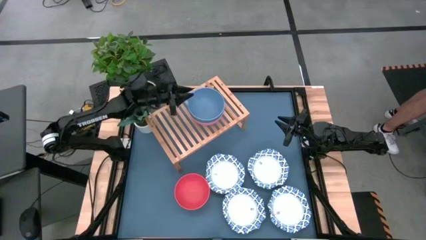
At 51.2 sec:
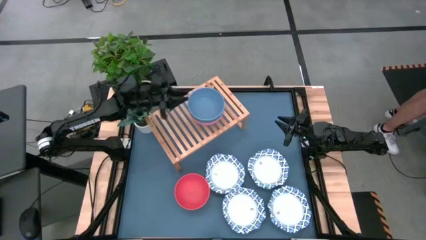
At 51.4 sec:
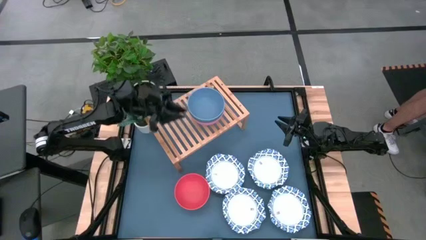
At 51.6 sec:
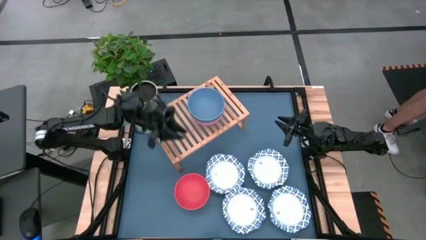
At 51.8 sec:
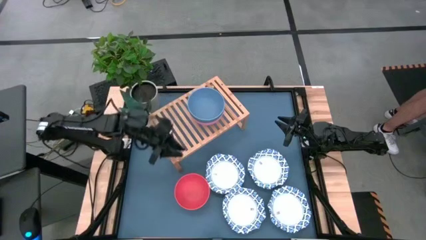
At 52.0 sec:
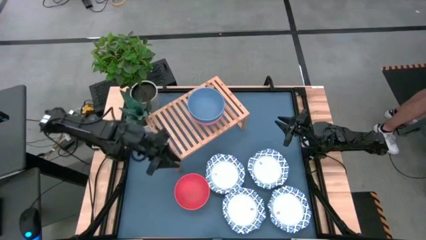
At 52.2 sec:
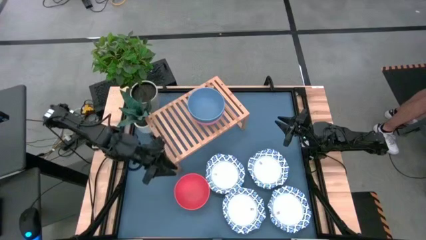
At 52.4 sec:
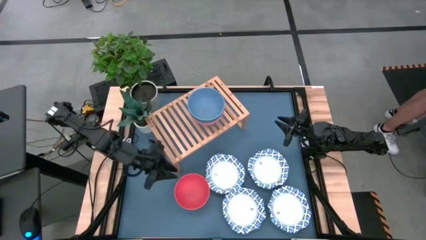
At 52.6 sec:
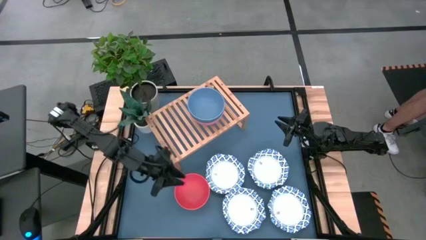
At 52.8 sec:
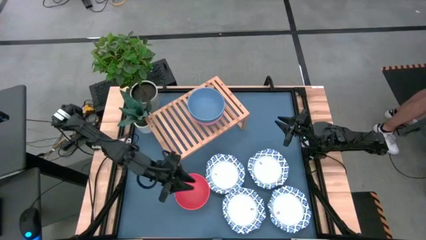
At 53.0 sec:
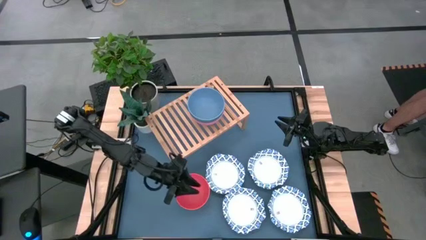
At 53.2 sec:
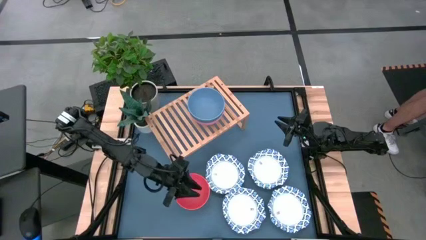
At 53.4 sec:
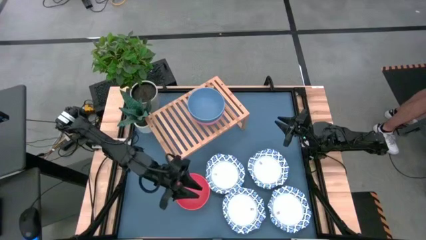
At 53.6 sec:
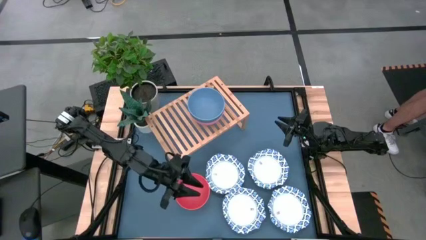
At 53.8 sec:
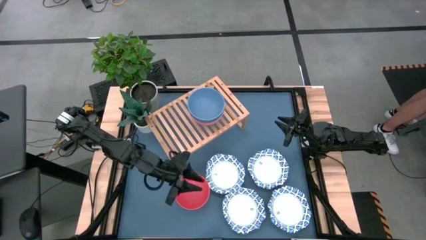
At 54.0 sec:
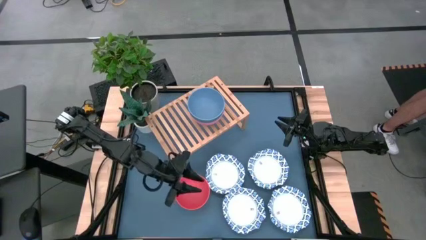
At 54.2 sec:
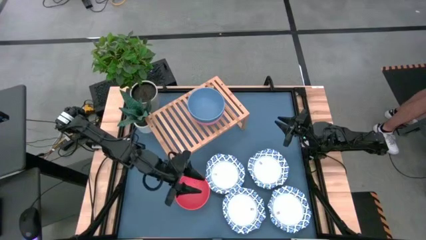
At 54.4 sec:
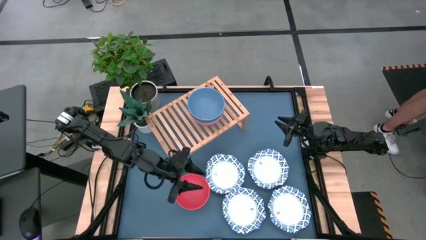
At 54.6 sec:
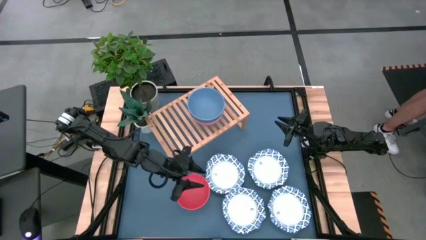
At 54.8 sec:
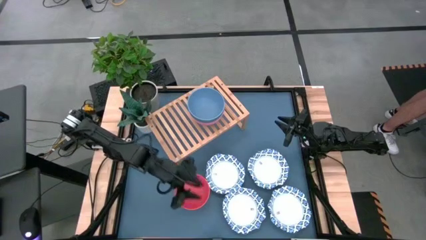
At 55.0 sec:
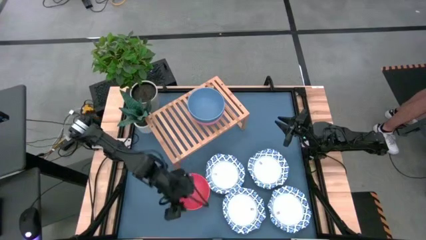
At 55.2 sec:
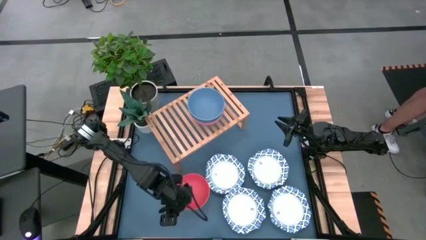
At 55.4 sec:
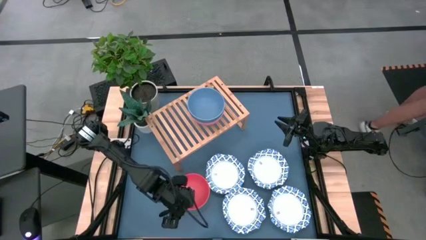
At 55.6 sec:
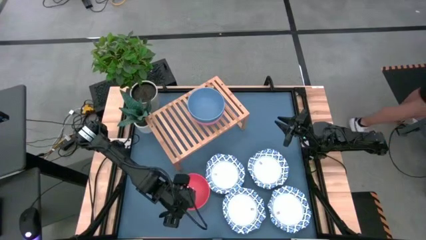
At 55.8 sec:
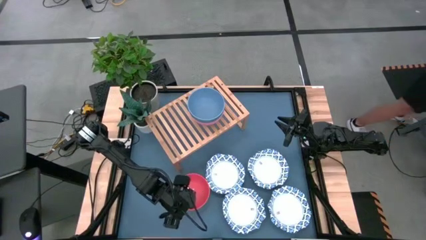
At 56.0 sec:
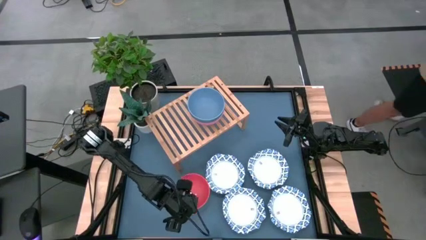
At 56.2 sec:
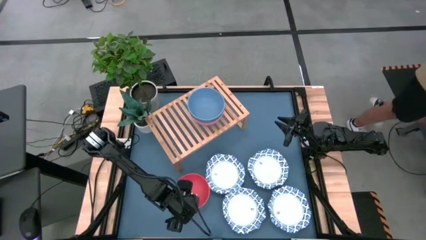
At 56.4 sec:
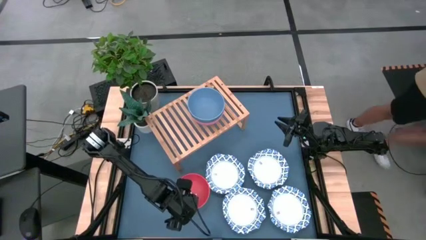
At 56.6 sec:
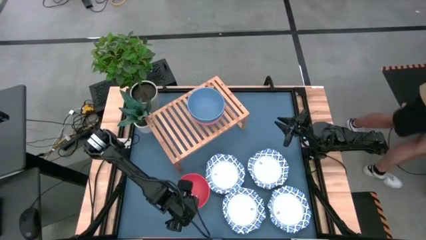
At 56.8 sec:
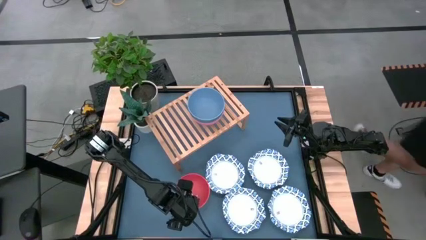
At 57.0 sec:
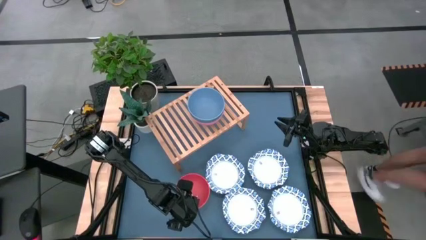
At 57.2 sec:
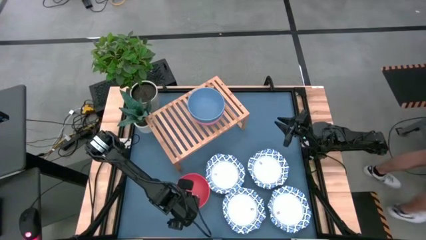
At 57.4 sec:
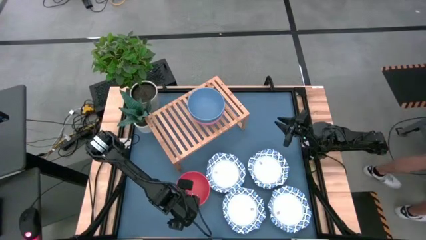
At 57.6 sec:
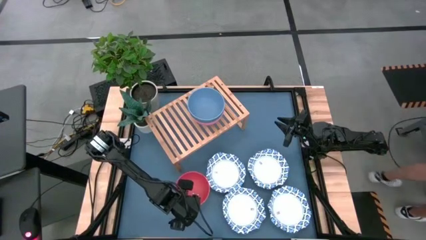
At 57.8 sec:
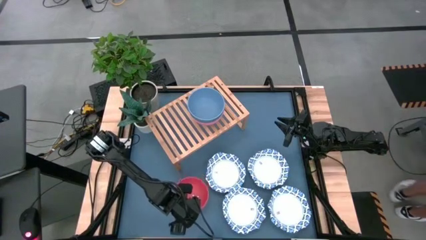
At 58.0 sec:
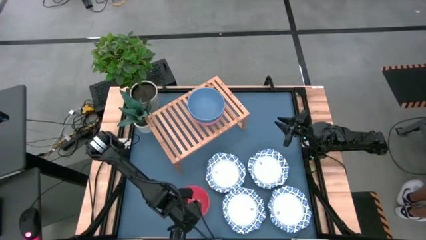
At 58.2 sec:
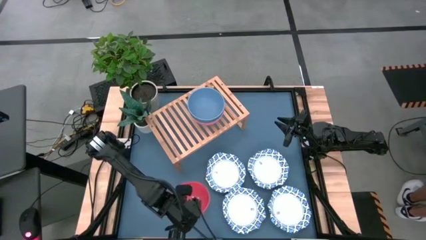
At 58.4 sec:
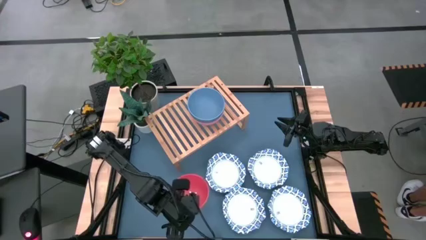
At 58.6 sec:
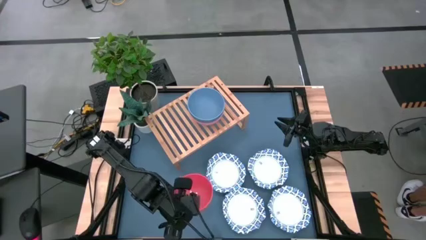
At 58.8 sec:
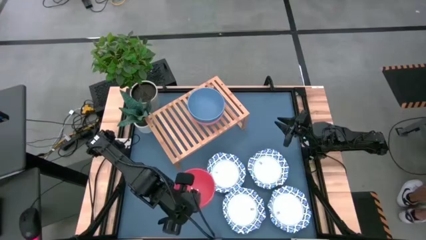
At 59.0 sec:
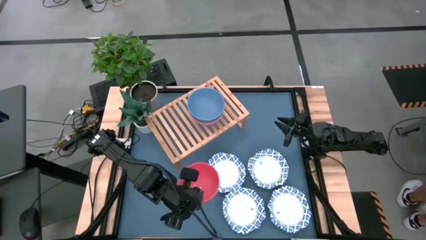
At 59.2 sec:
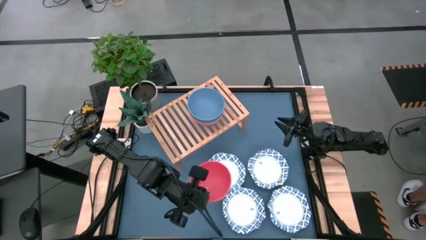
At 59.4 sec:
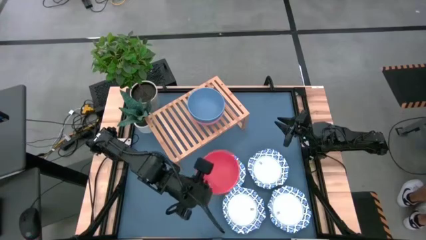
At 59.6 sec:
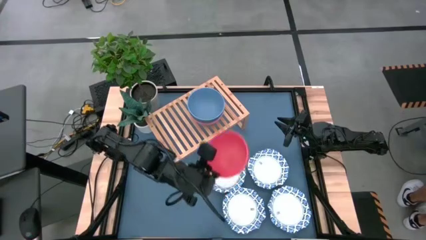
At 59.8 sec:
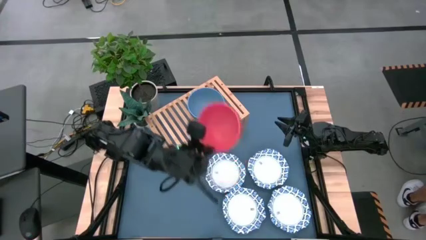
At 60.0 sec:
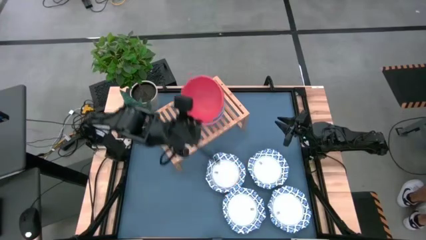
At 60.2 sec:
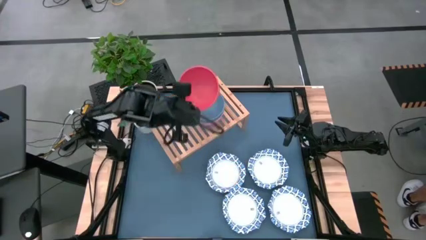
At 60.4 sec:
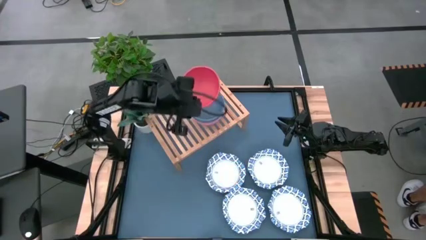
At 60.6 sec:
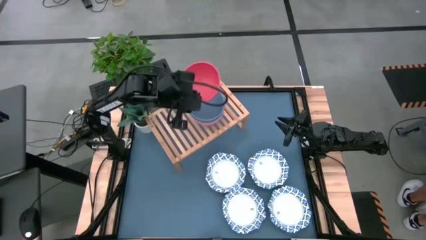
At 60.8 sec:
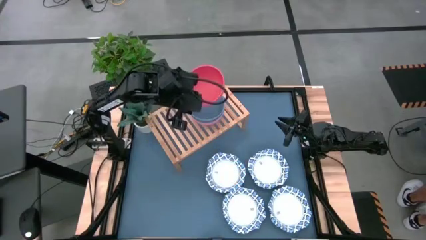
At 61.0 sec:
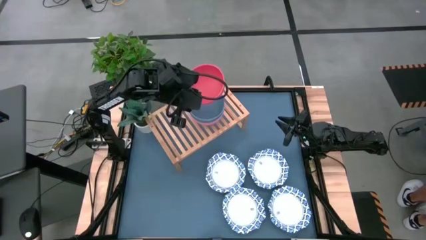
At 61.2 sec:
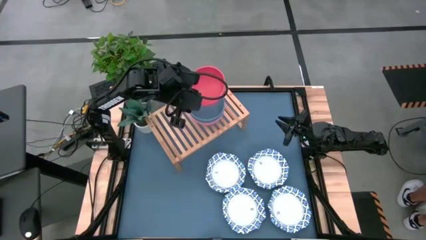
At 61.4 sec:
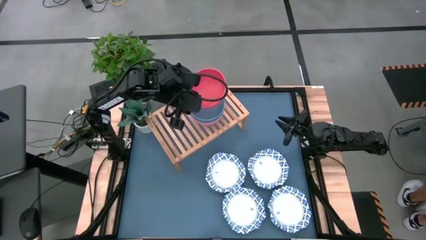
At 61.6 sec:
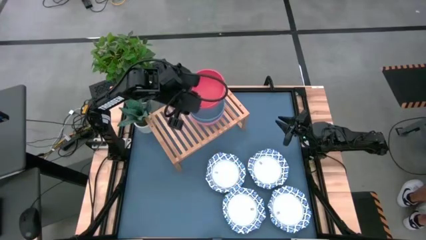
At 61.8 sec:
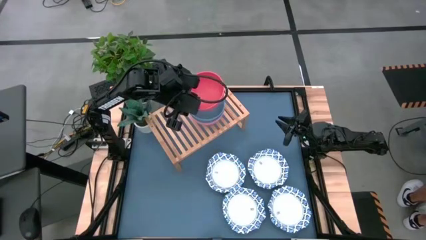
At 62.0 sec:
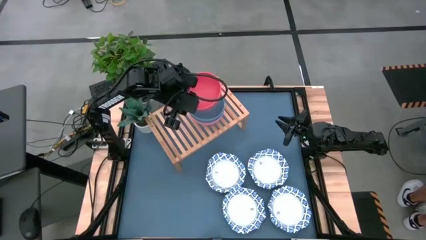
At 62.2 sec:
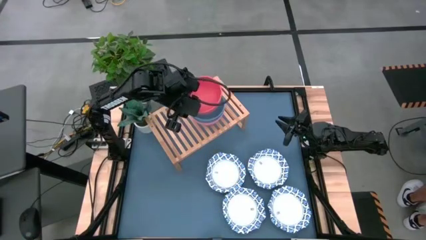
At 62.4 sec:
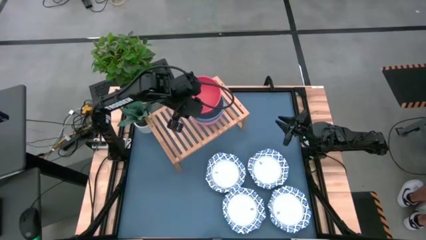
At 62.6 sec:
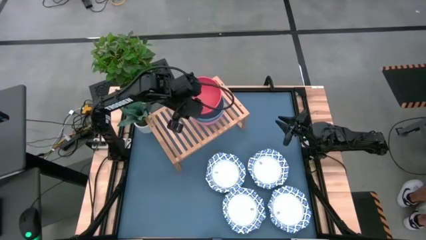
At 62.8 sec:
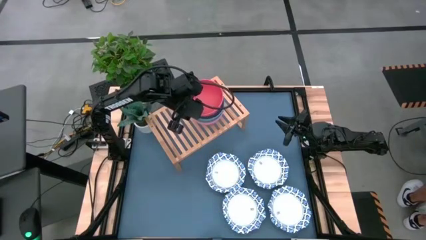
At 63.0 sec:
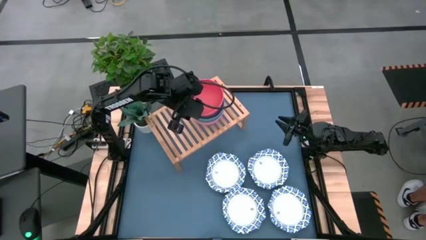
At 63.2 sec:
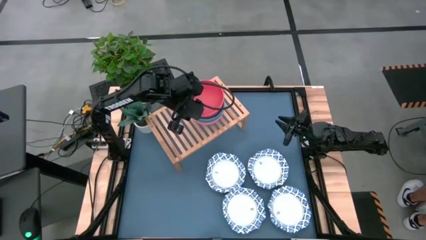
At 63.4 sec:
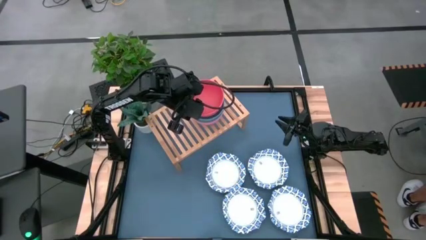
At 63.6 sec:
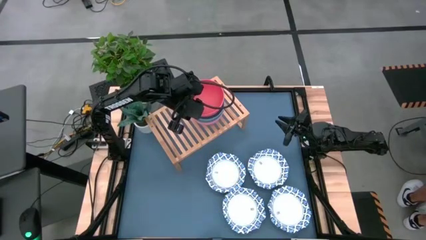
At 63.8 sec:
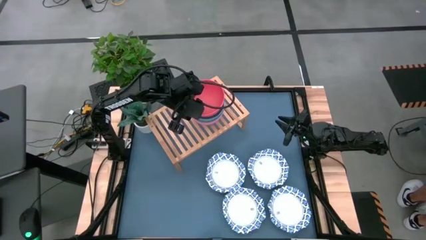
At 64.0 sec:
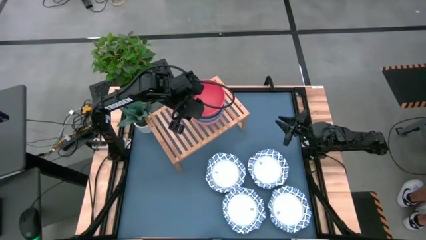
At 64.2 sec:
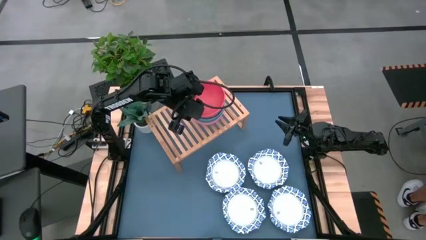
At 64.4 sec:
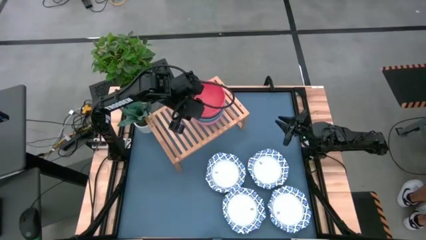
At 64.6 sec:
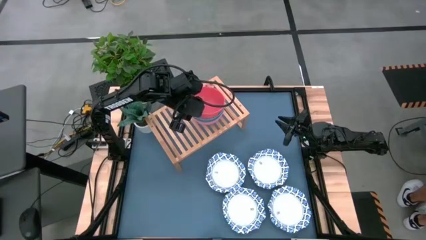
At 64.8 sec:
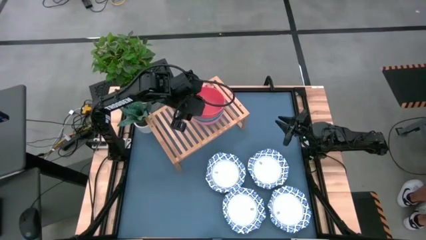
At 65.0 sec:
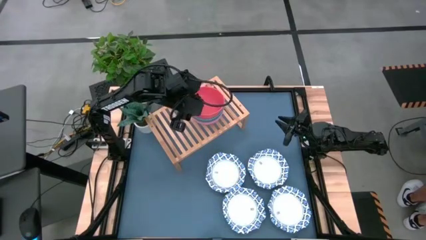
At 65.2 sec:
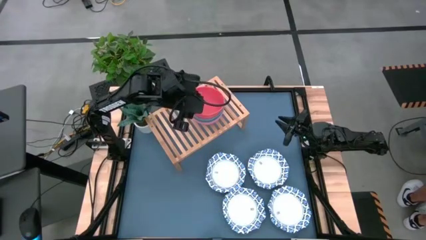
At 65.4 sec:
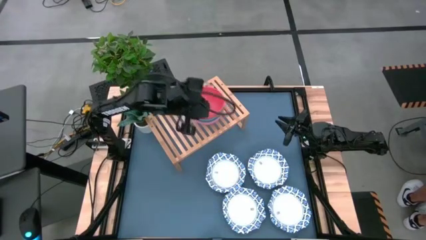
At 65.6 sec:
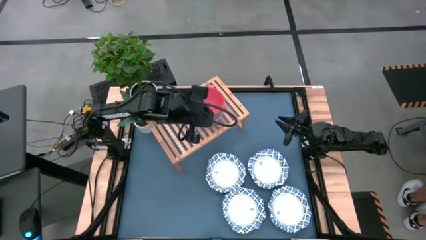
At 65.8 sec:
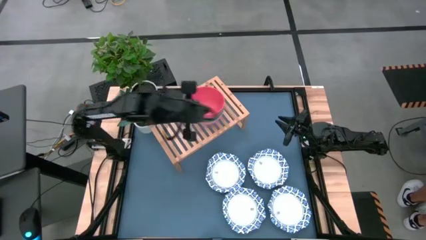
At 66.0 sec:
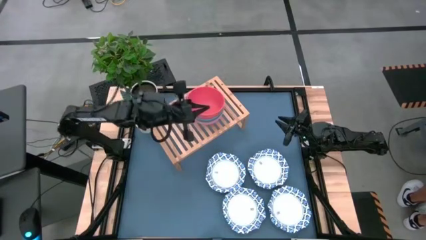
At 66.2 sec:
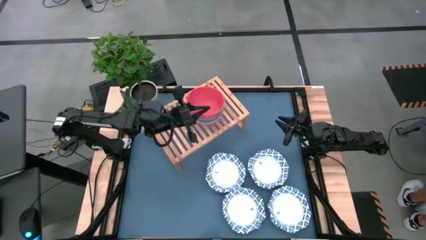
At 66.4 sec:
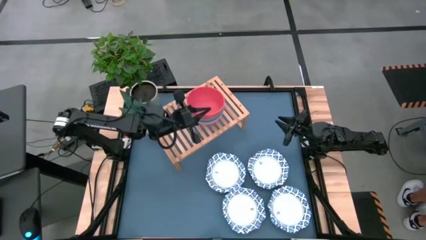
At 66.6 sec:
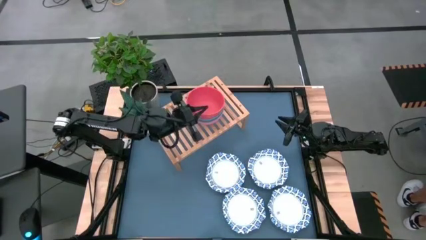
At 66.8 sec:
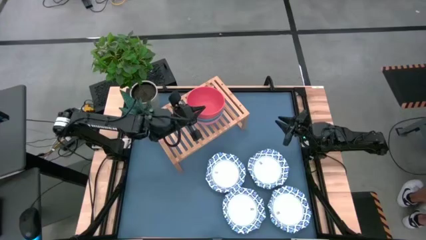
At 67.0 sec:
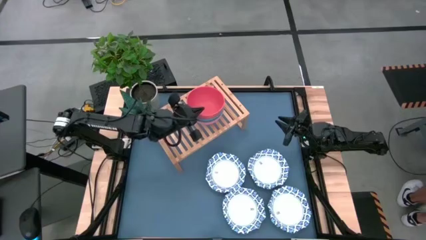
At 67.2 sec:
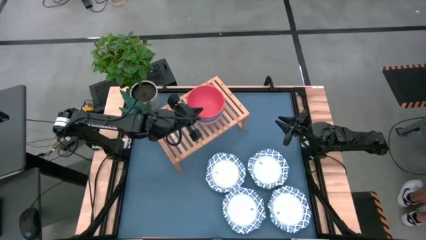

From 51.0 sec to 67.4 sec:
Task: Place and stack bowls onto a shelf
Stack the red bowl on top of the blue bowl on the shelf
